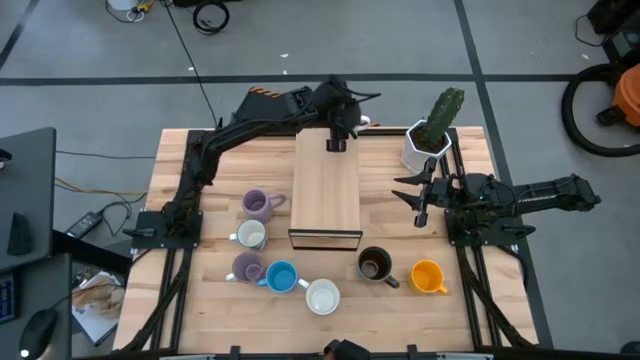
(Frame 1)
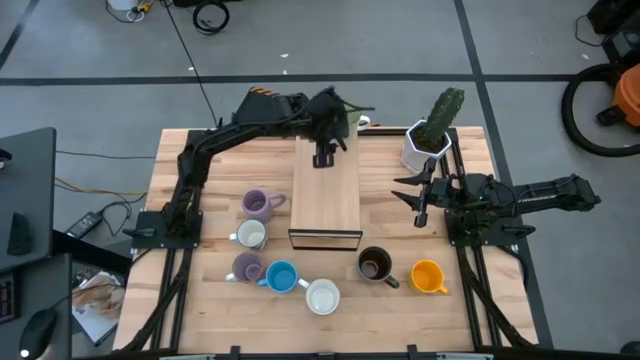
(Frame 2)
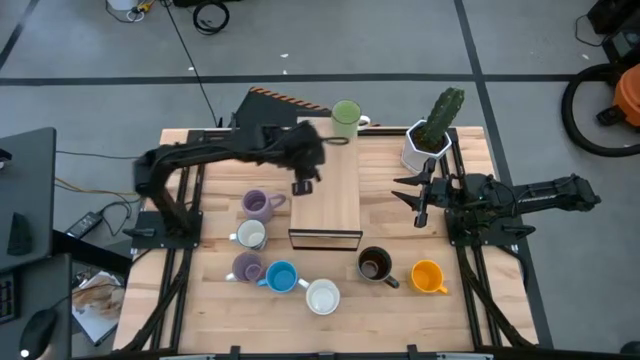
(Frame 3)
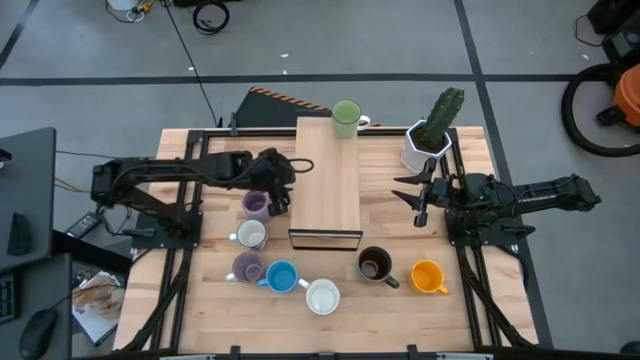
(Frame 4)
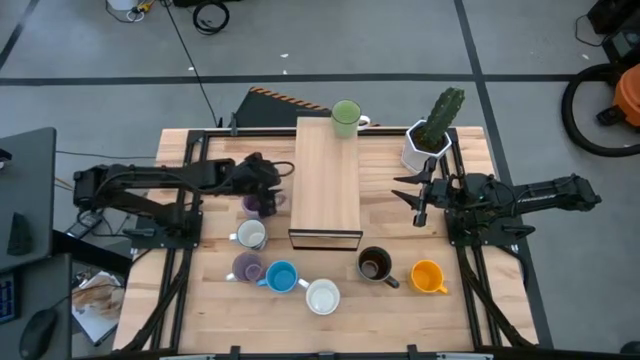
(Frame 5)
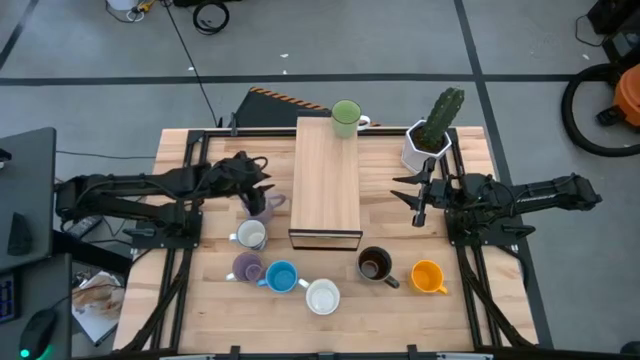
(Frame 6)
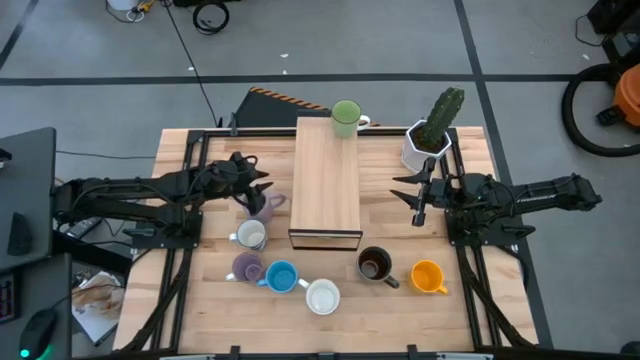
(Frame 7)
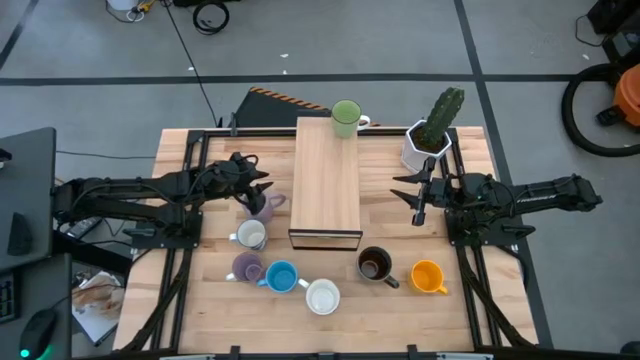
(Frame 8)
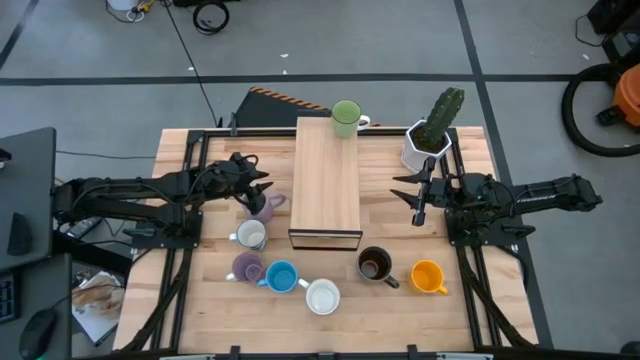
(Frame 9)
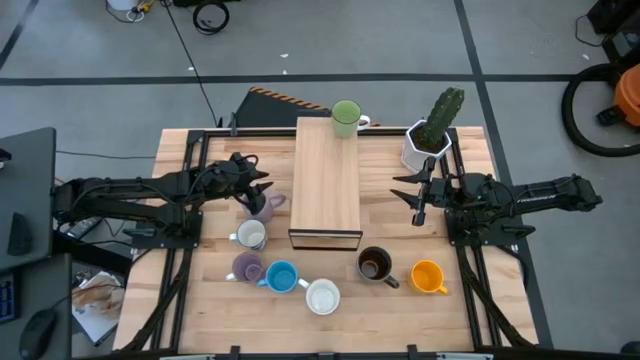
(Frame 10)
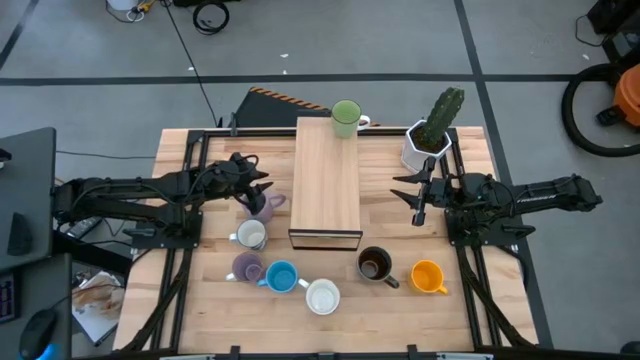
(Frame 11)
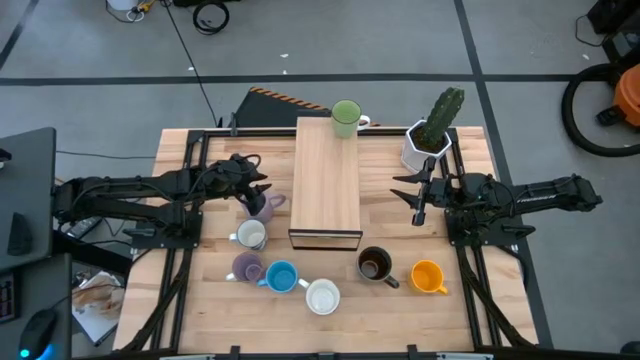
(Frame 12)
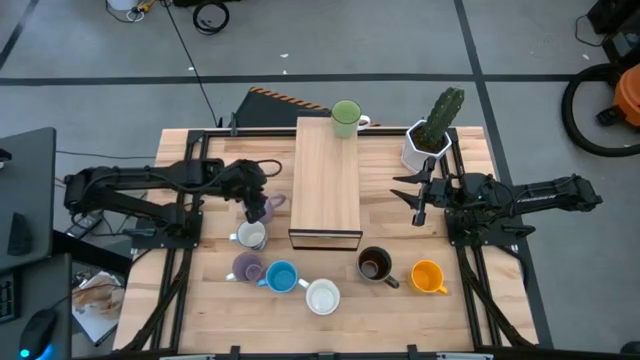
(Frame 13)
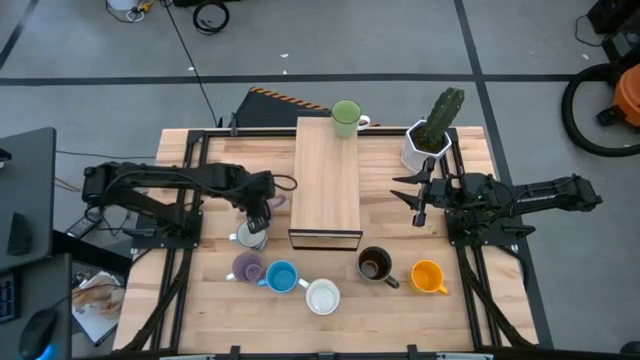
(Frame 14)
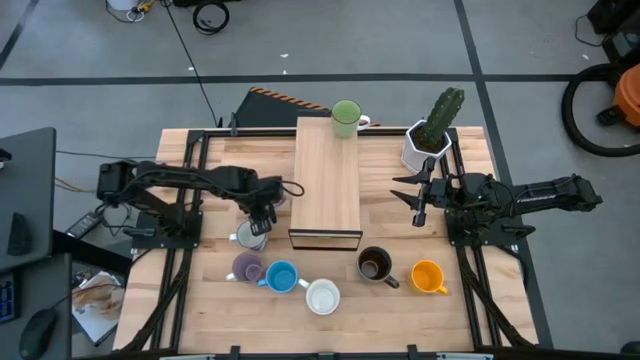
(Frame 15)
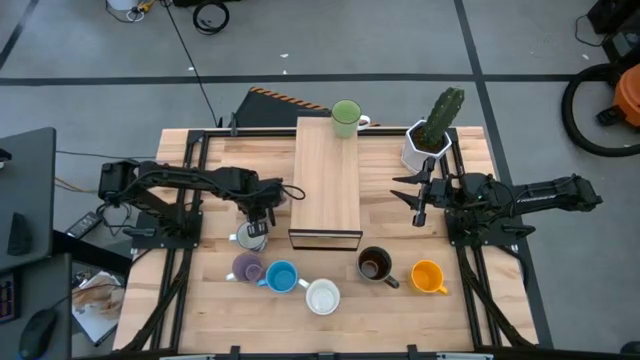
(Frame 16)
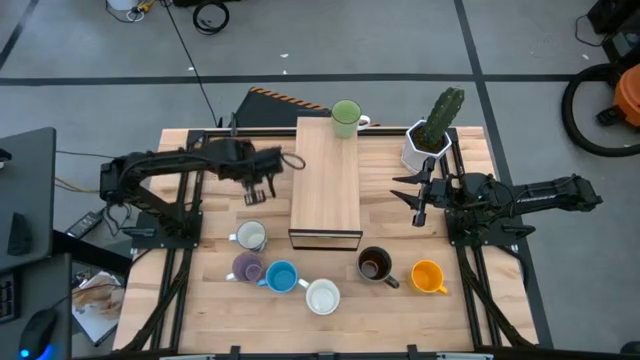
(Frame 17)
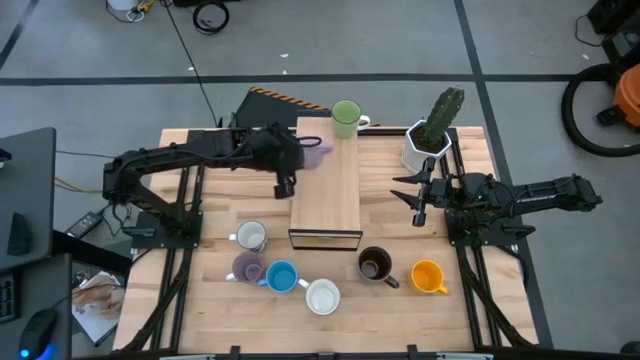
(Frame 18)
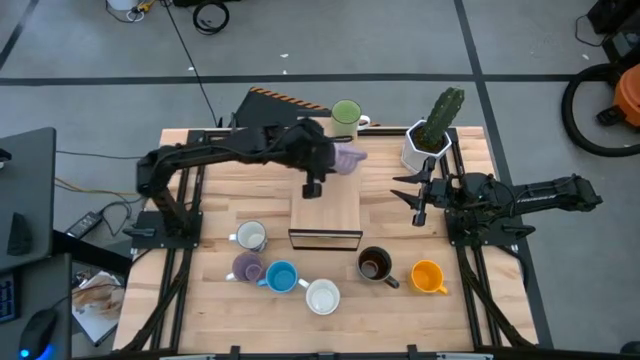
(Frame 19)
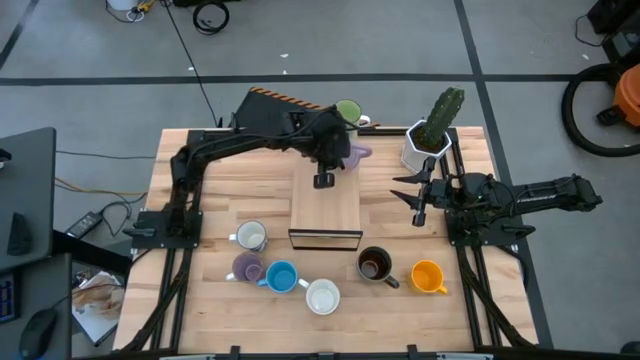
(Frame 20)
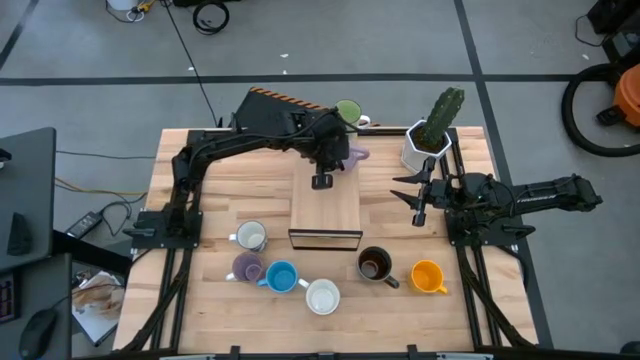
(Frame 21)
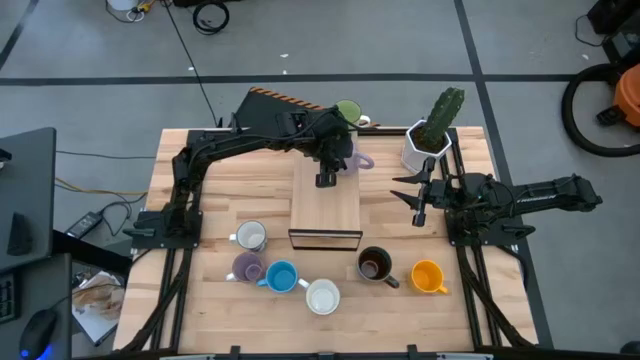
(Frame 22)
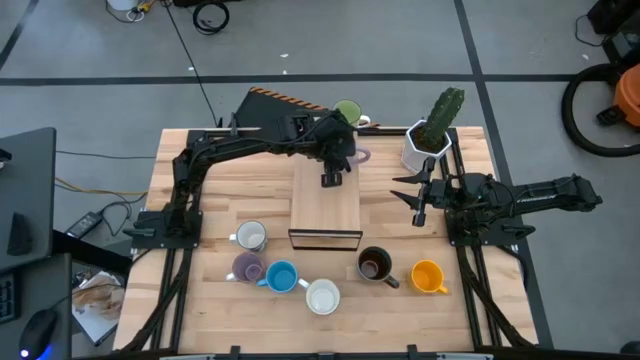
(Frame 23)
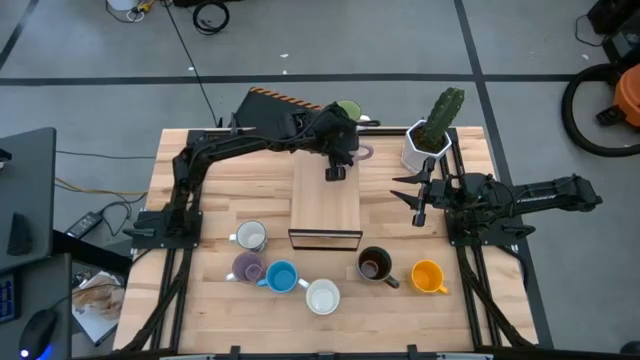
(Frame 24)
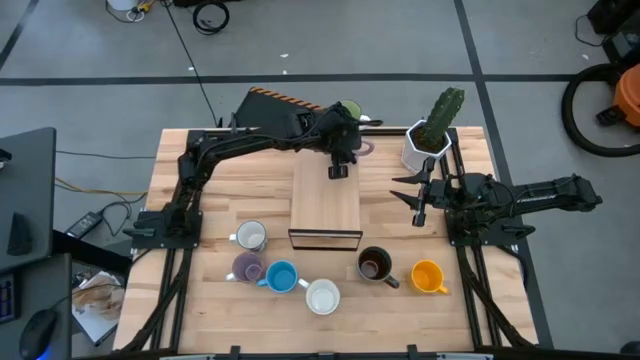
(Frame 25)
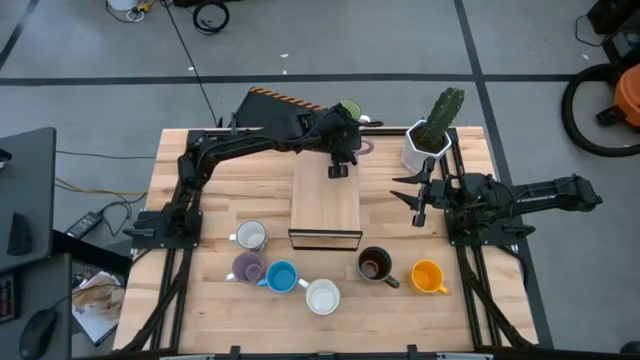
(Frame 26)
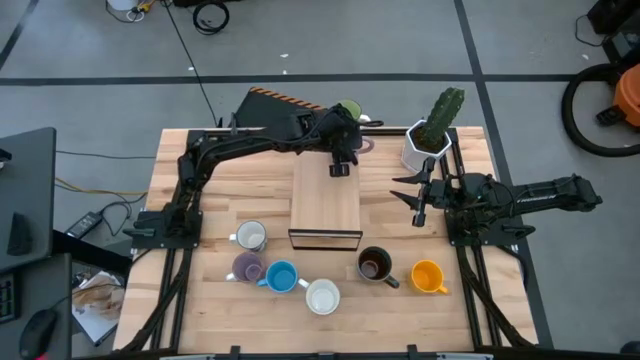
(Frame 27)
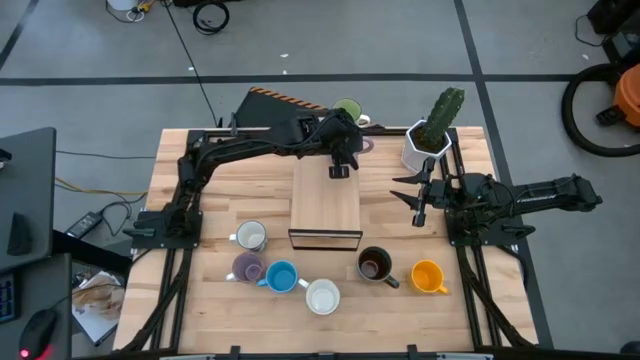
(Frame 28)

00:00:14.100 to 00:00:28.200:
Task: Place coffee mugs
Put the top purple mug on the shelf

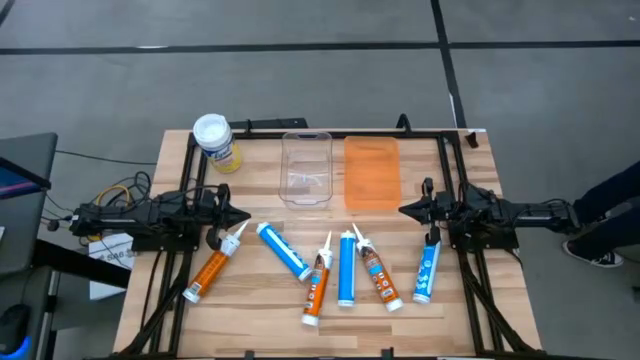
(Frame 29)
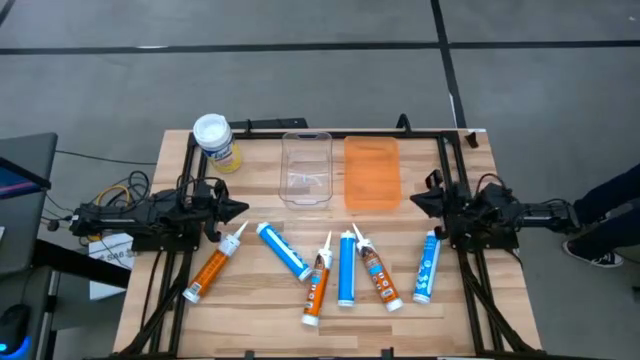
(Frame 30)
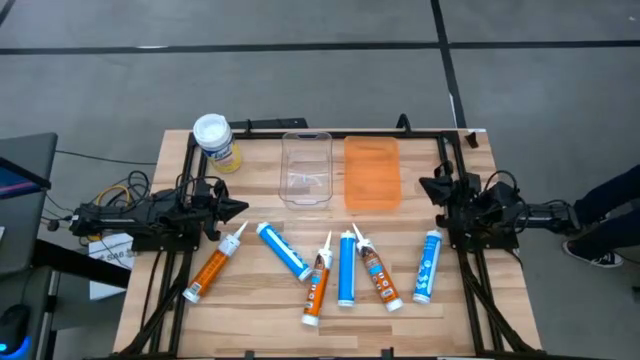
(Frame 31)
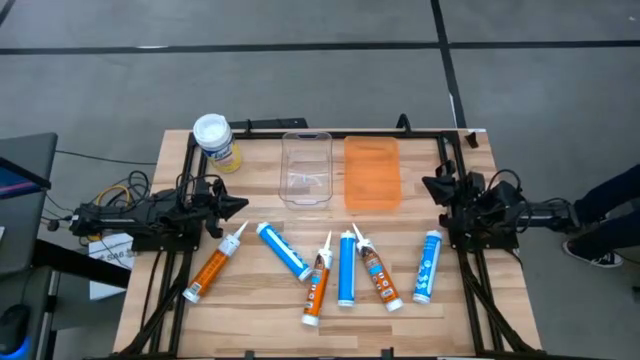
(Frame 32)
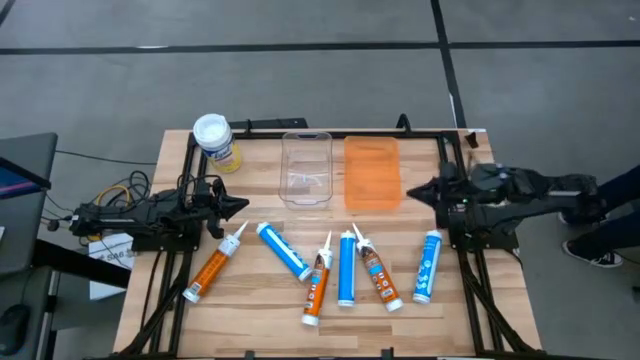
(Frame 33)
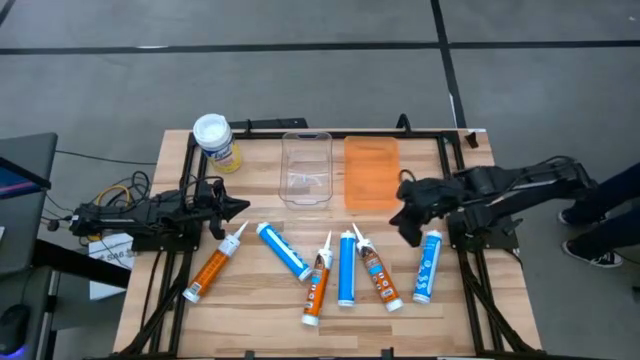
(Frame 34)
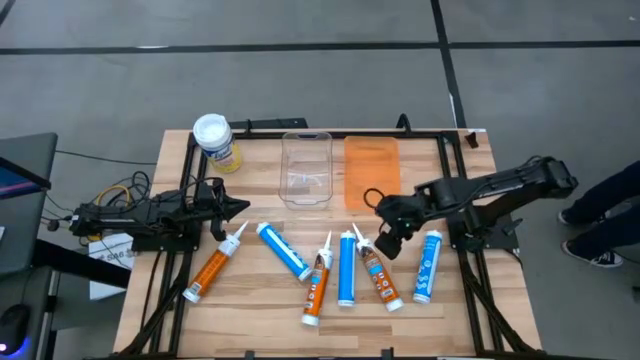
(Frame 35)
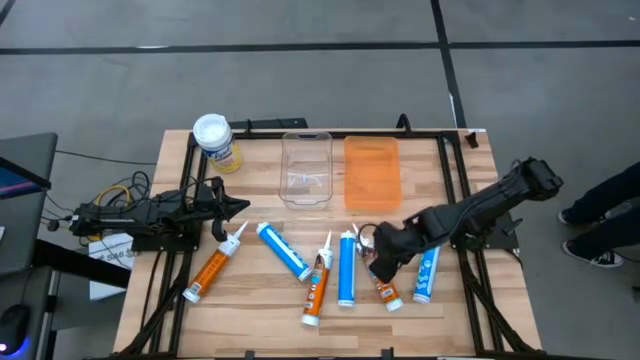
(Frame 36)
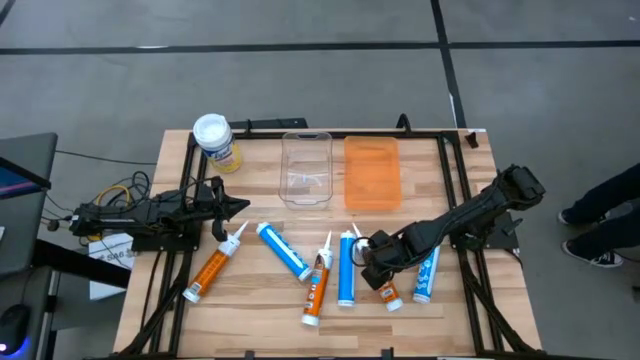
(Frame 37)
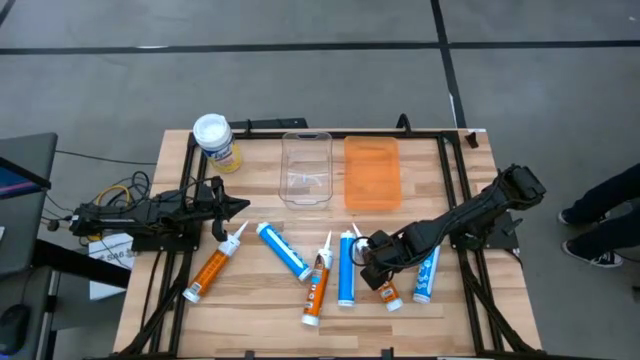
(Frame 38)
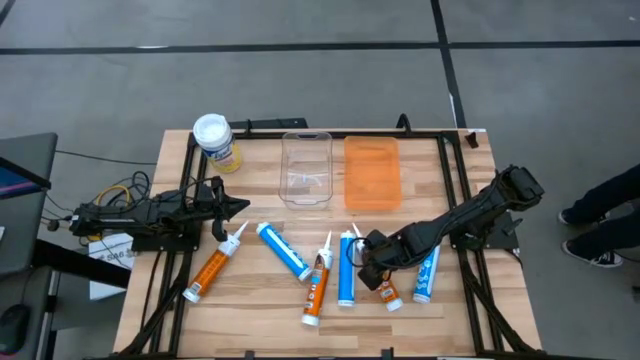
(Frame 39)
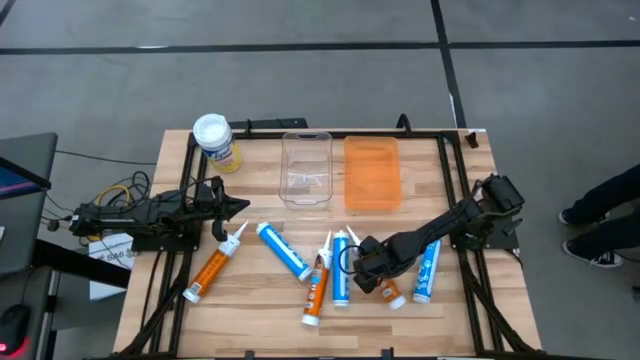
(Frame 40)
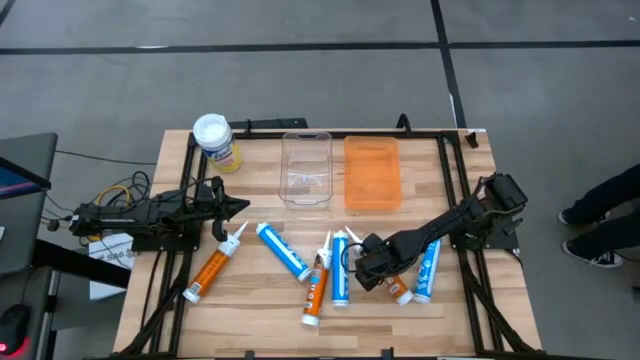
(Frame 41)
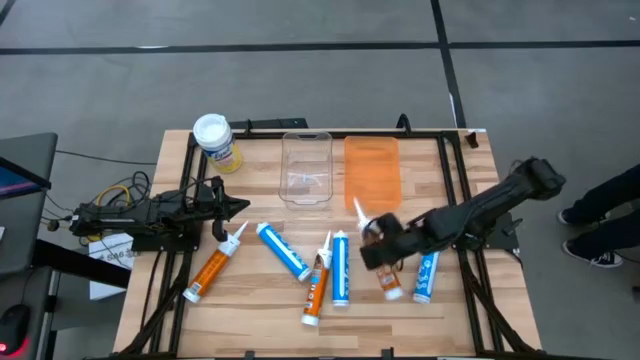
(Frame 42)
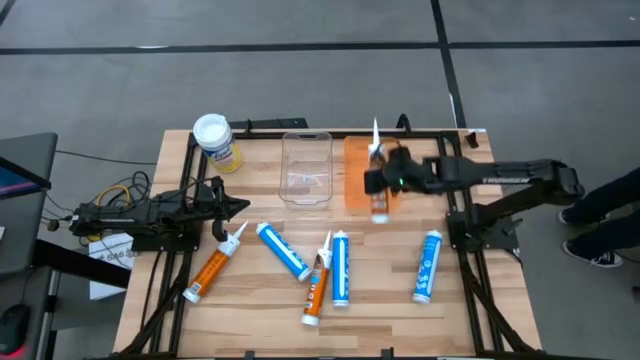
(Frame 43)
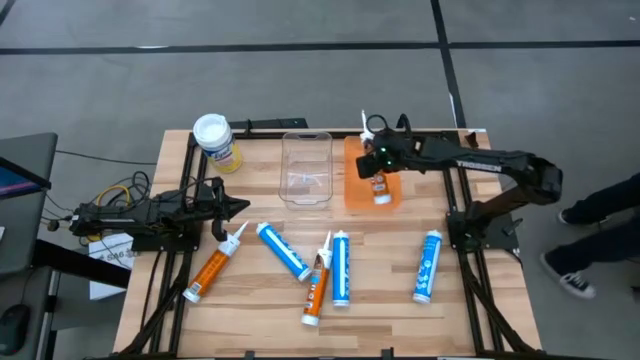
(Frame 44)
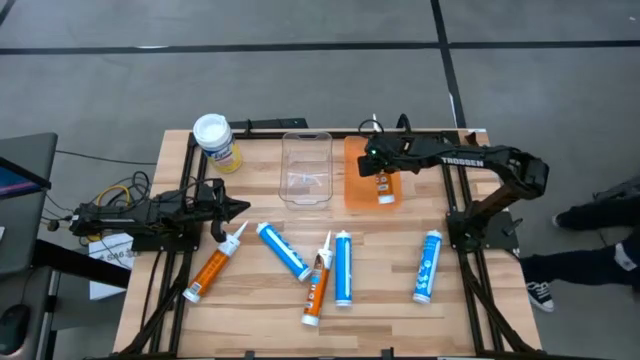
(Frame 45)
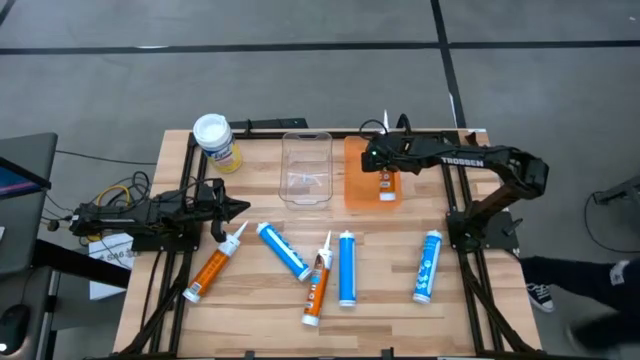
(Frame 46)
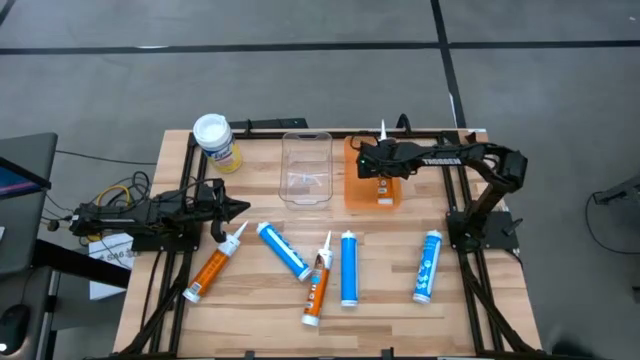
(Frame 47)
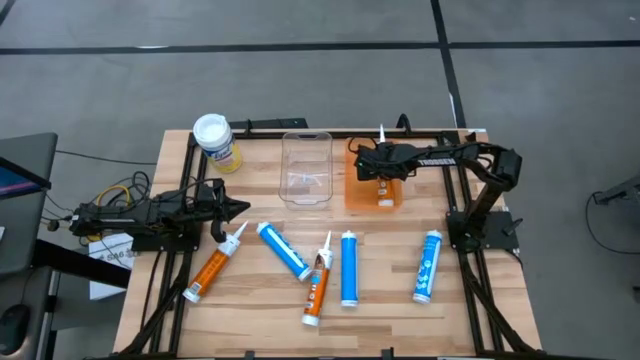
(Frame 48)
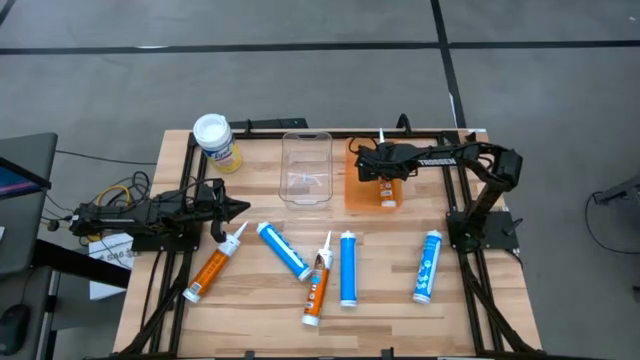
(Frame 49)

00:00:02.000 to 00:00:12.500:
Task: Pick & place silicon tubes, Sealant and Lysol wipes
Put the right orange sealant into the orange bin
